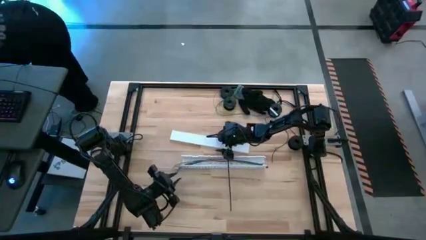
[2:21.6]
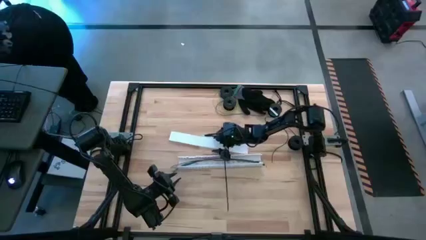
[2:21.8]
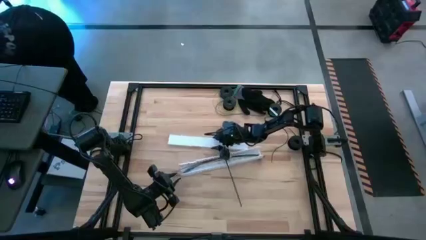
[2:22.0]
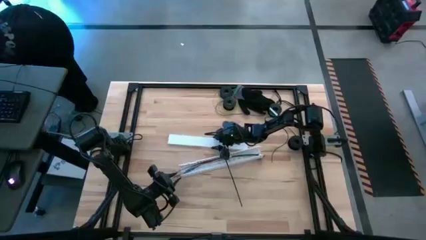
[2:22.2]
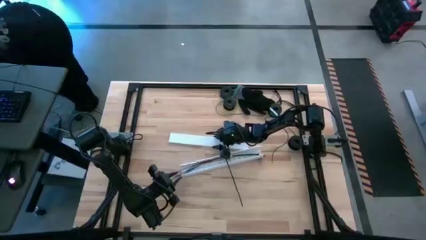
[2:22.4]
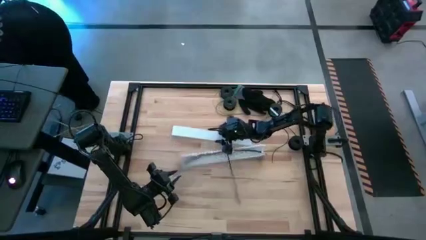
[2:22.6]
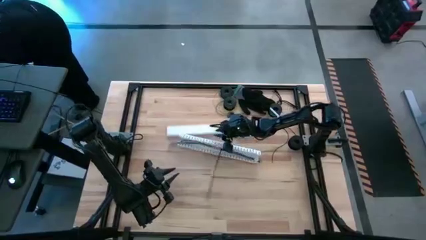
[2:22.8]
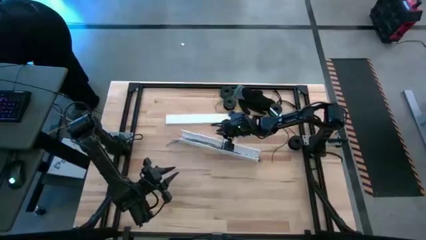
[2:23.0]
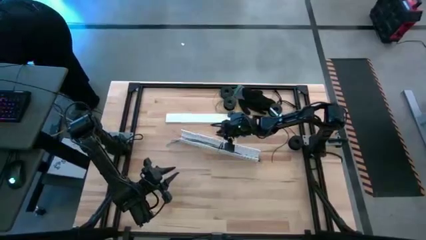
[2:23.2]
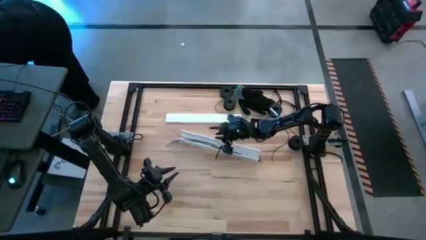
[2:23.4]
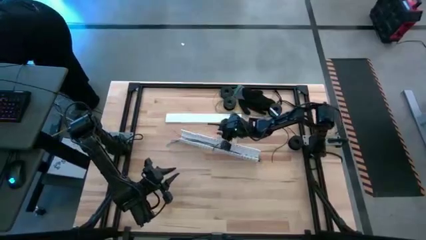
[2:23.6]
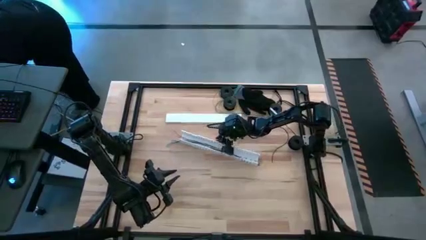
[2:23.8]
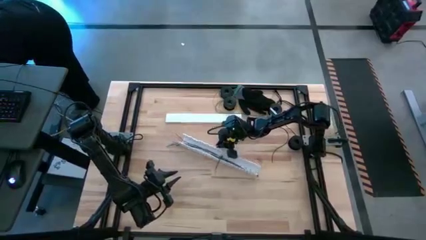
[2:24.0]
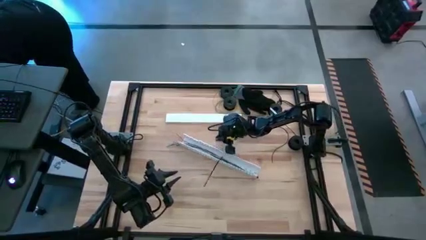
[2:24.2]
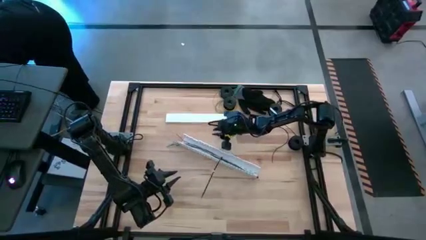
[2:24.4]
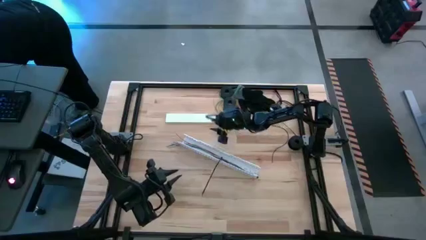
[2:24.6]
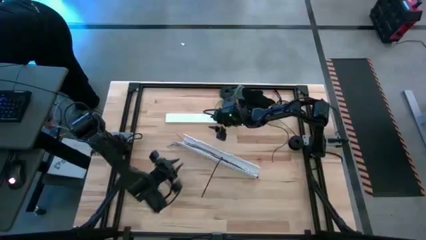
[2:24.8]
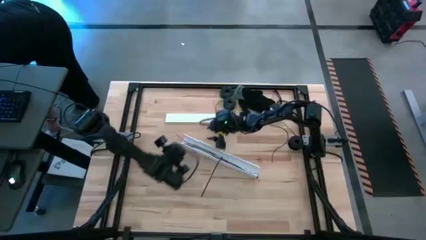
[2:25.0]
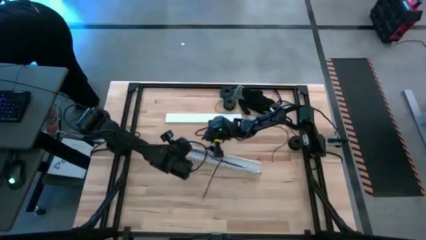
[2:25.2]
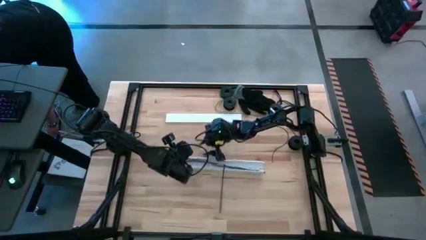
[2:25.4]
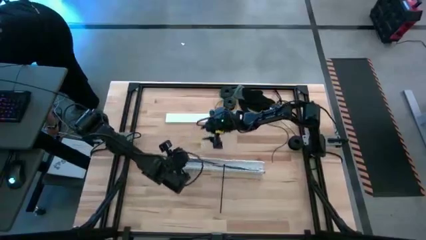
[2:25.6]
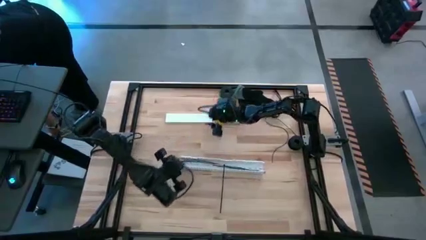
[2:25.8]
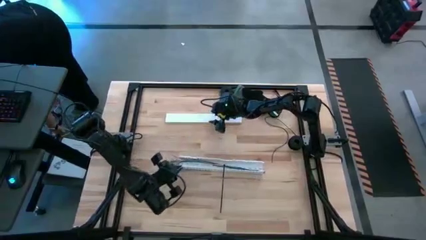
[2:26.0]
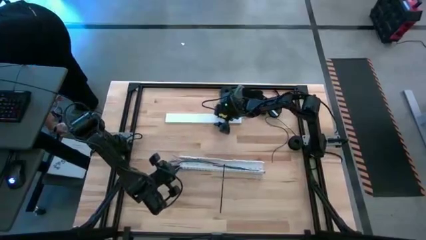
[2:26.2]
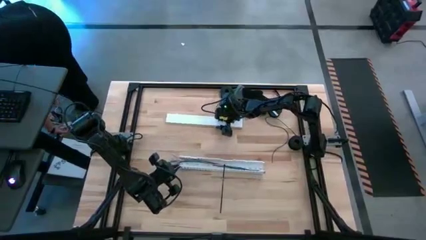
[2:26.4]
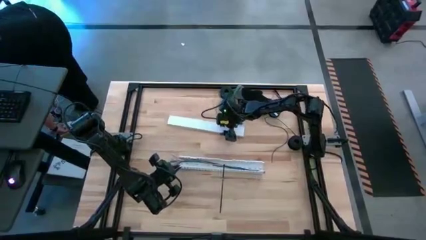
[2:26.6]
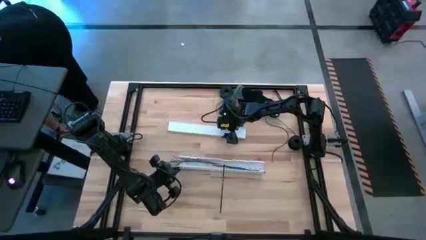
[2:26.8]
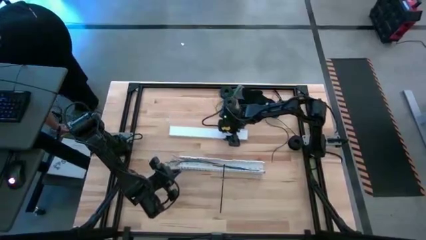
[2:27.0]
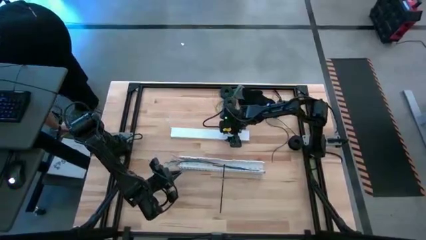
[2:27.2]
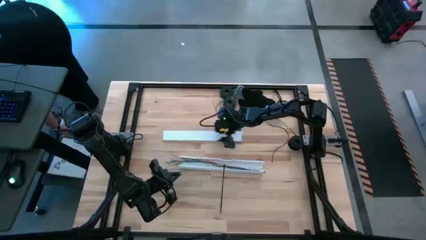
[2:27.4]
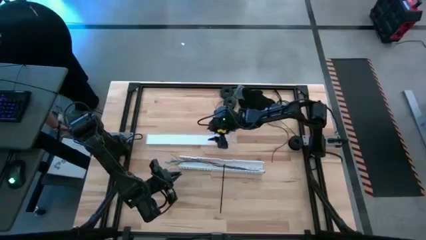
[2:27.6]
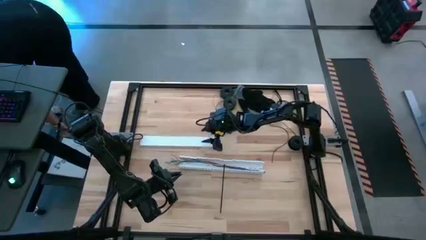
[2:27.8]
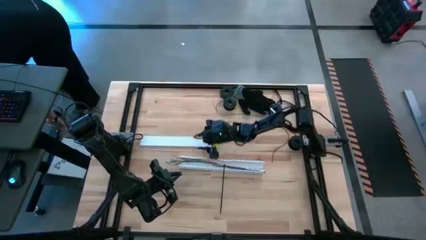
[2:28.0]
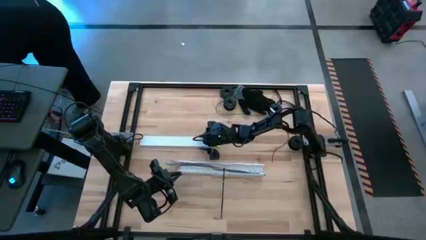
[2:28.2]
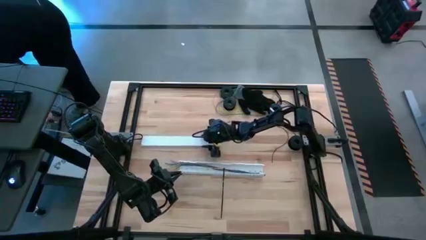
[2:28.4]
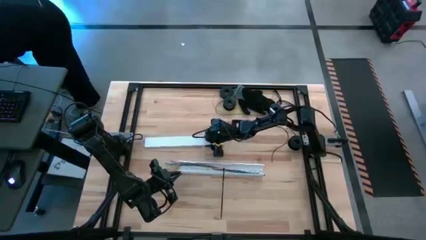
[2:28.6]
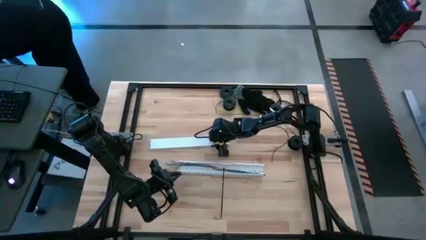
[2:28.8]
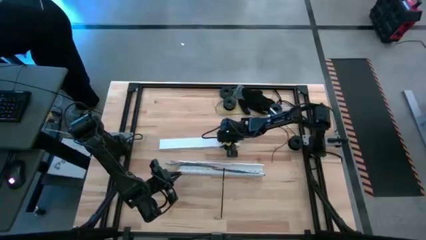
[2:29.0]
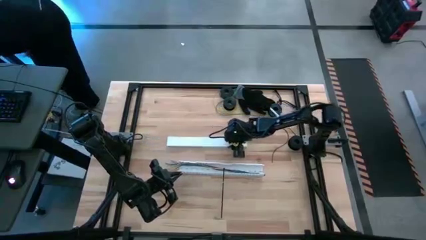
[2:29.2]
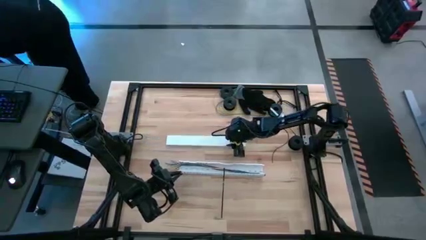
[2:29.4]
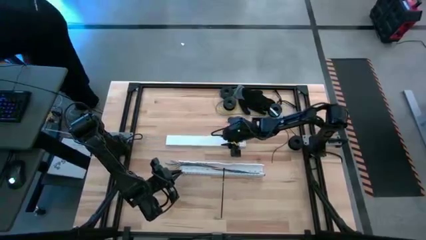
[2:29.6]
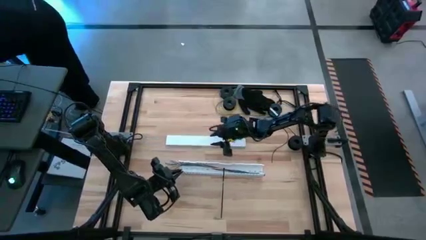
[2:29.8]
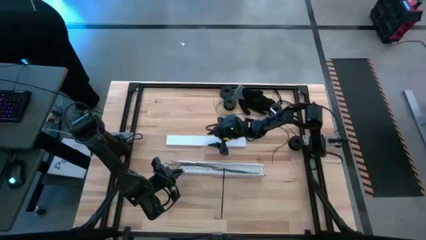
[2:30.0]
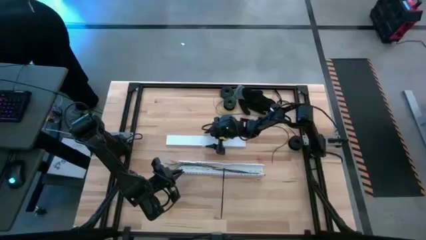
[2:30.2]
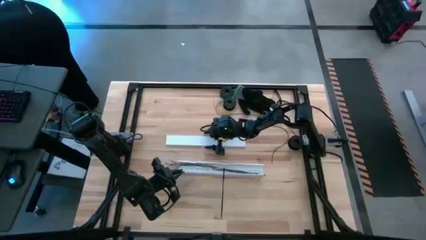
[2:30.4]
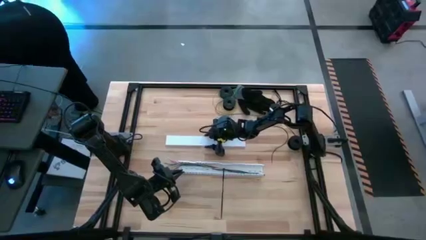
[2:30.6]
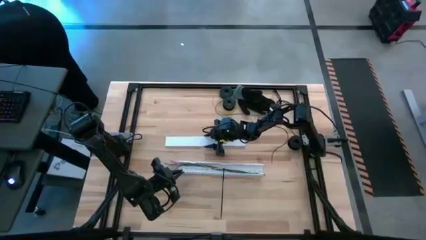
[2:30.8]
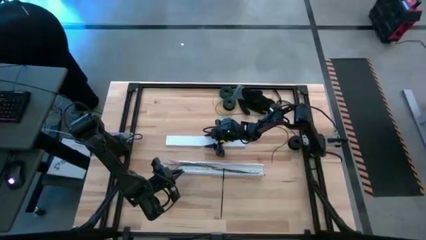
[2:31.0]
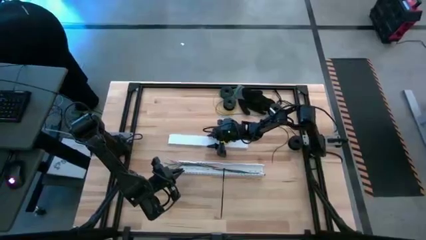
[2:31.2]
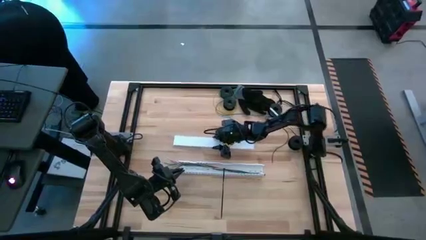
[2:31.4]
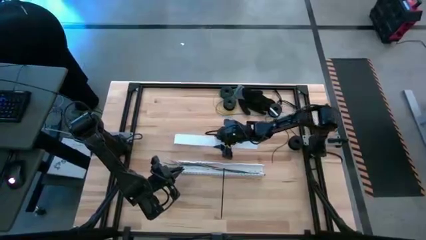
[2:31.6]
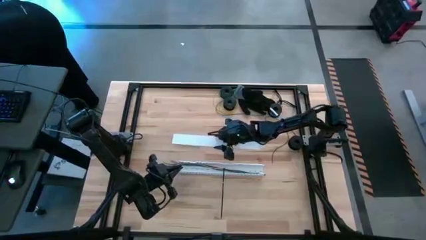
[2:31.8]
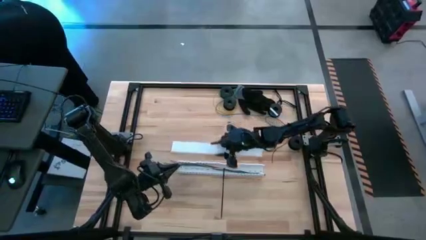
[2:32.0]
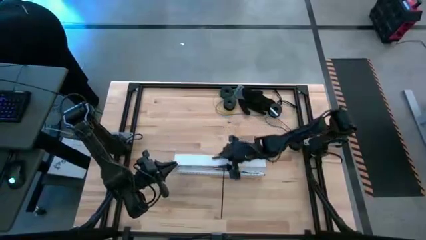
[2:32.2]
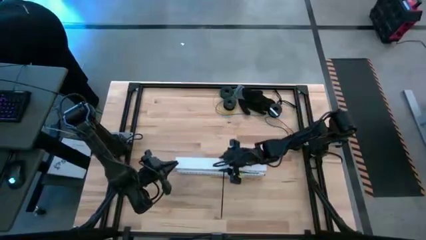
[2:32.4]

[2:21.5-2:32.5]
Task: Ziptie cables
Close the white cable duct

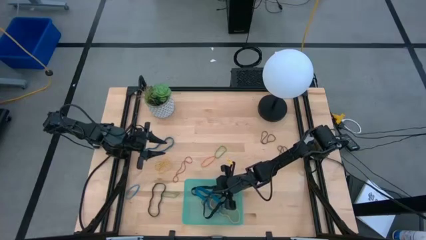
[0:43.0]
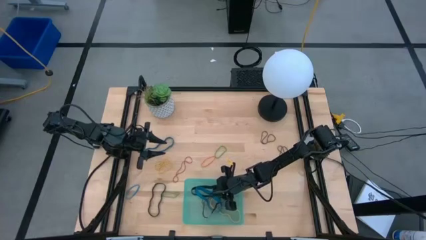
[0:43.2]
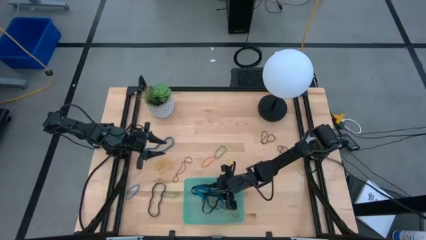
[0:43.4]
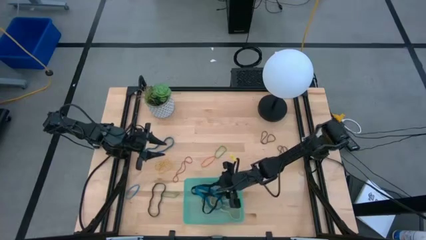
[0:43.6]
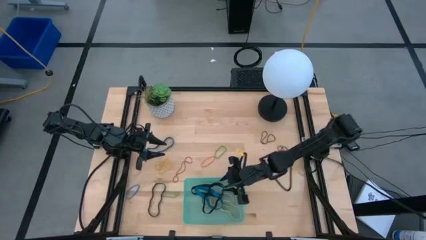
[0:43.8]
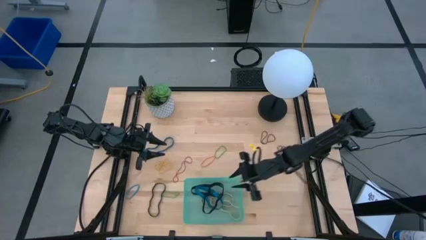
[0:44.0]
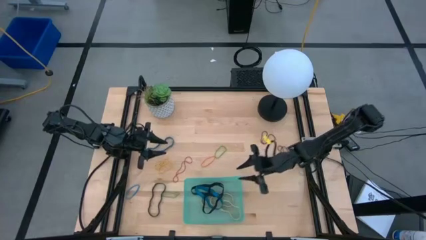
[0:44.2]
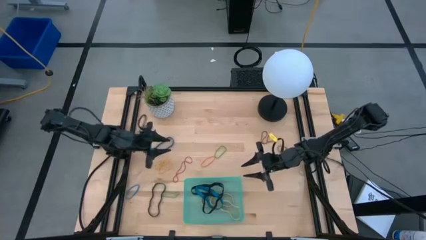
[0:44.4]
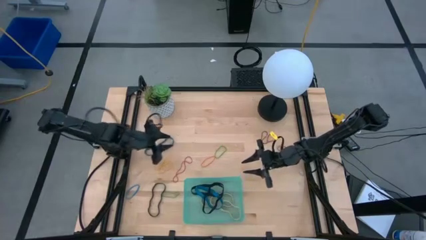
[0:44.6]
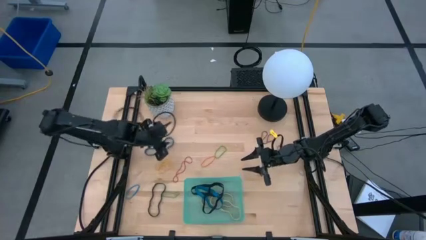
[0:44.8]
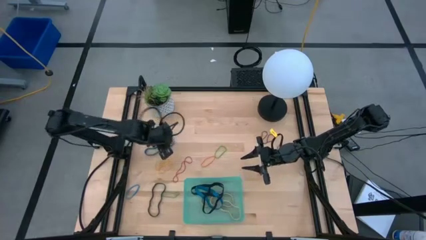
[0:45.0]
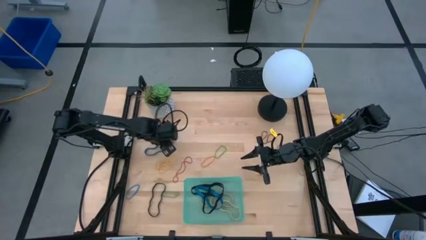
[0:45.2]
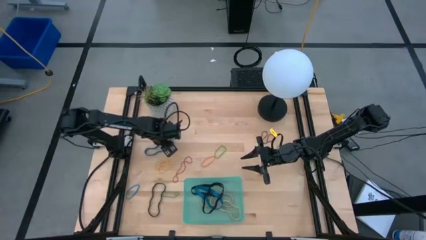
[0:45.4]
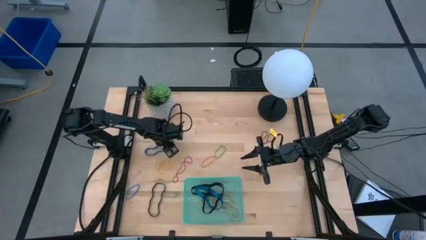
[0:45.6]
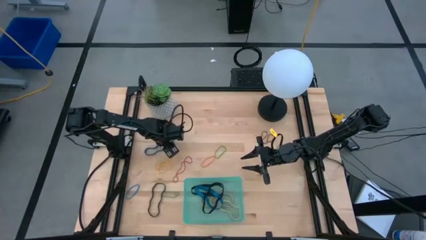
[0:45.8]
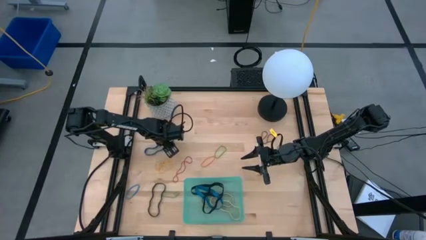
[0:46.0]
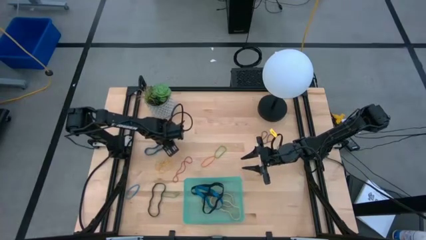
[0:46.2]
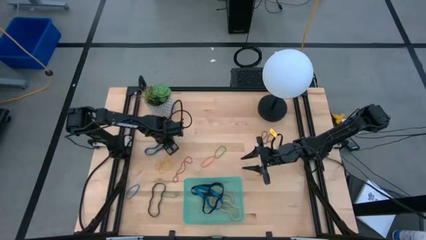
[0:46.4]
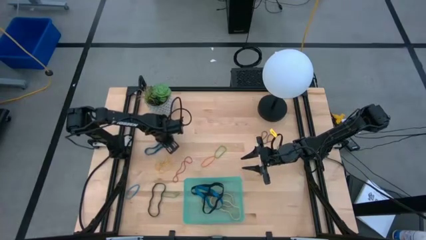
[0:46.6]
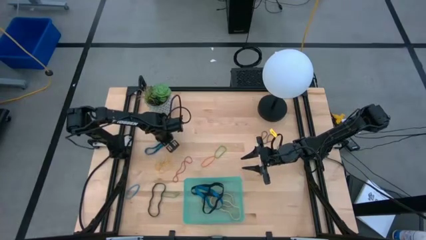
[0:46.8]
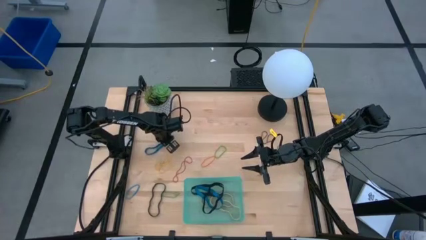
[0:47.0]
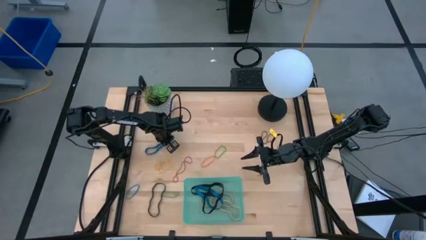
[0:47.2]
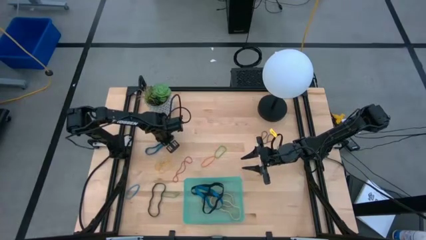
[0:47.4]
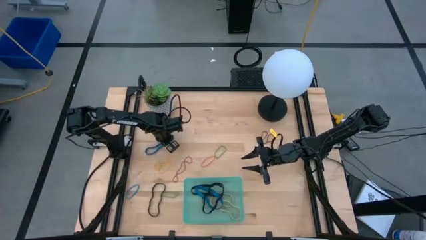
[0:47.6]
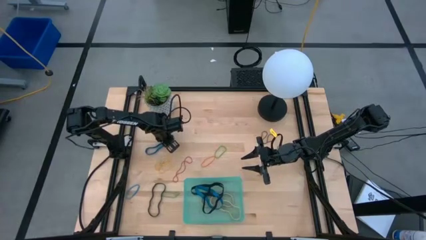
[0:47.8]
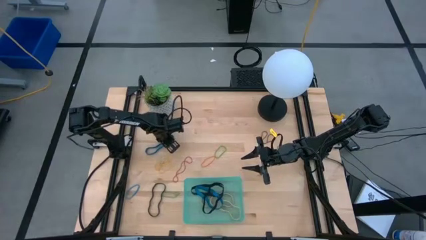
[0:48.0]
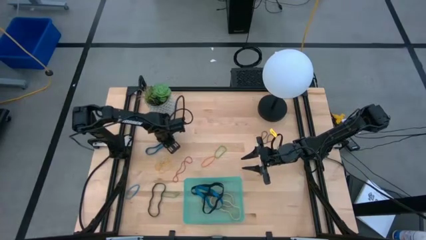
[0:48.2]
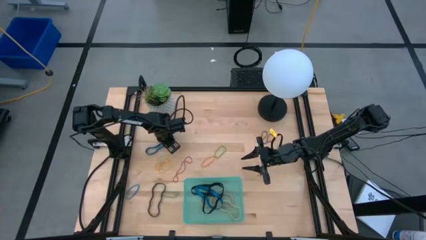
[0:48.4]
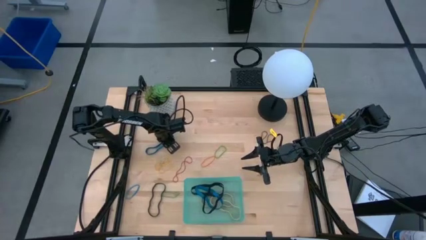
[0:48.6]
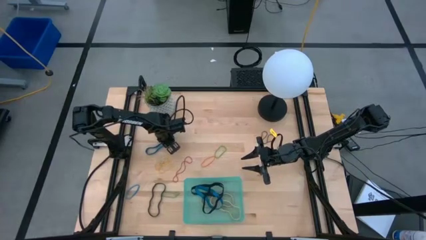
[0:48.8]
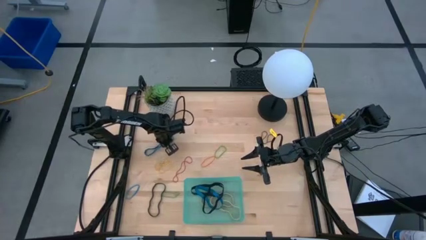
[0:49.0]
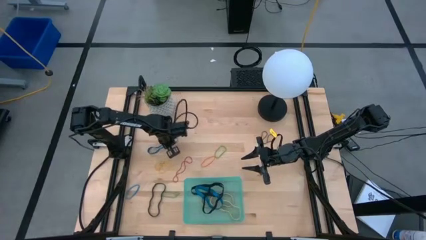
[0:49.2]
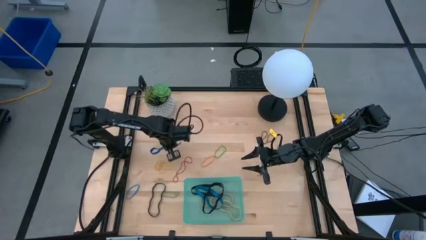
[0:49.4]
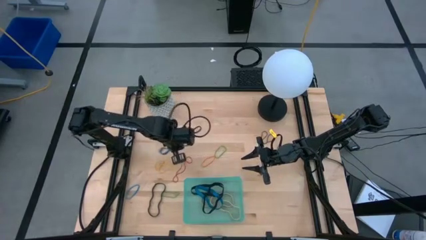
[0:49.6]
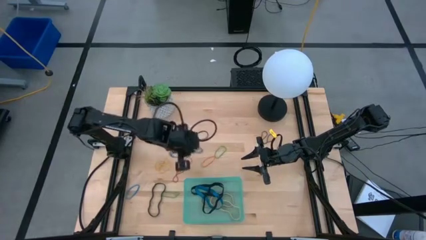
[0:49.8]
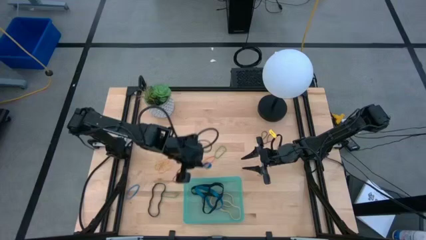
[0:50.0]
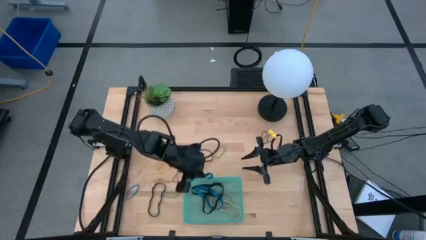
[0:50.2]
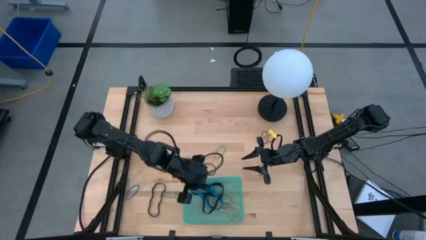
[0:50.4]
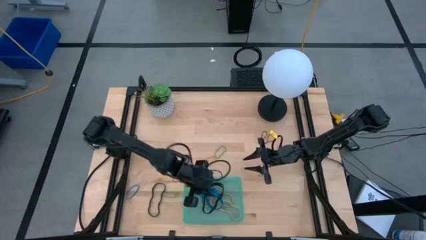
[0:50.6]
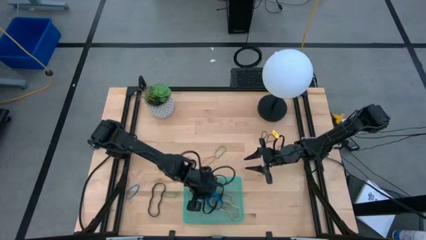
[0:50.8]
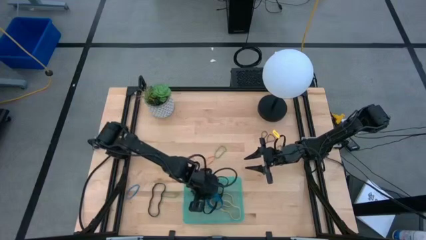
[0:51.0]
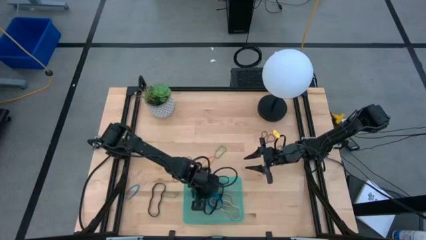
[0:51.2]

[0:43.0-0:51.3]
Task: Pick and place rubber bands into bin
Put the top large blue rubberband into the green bin
